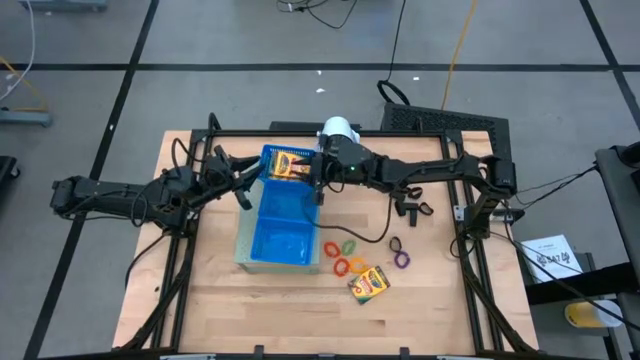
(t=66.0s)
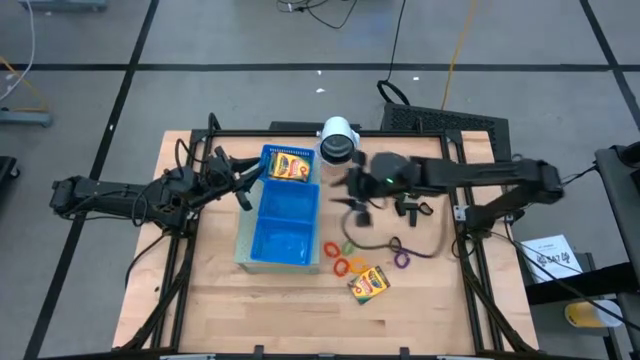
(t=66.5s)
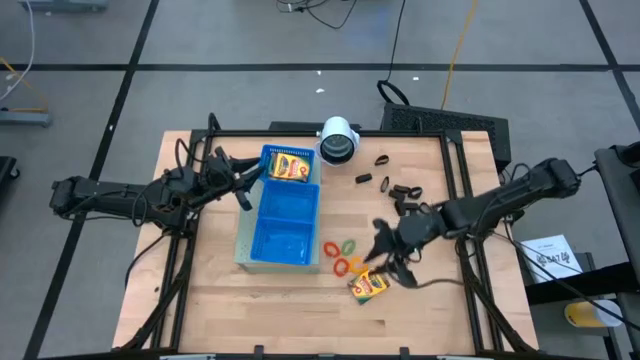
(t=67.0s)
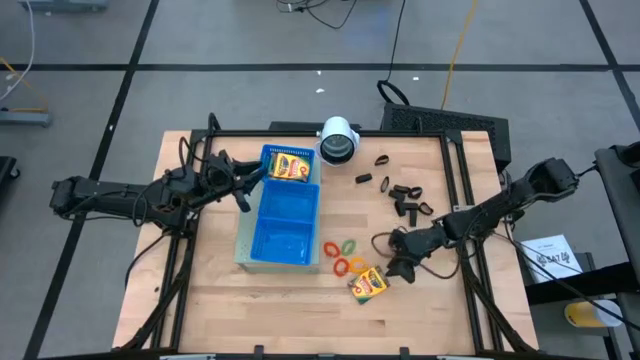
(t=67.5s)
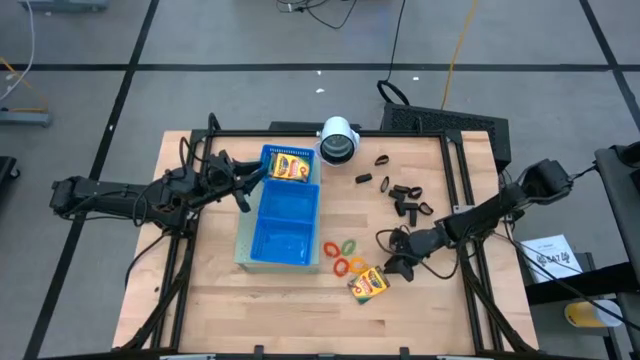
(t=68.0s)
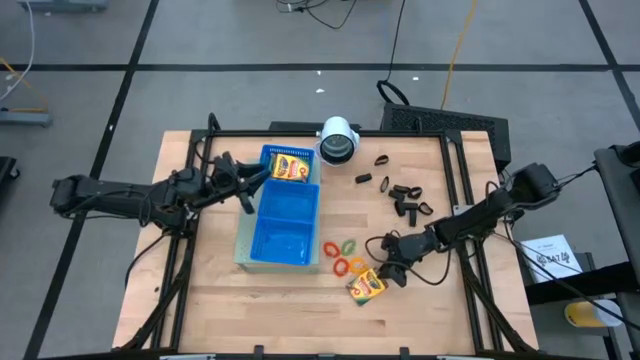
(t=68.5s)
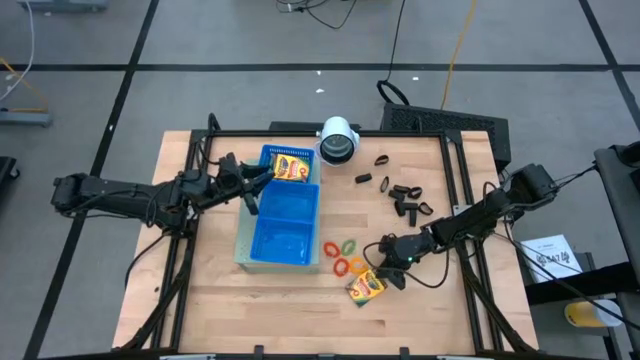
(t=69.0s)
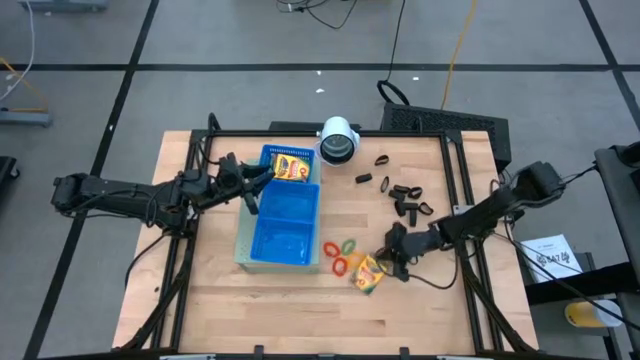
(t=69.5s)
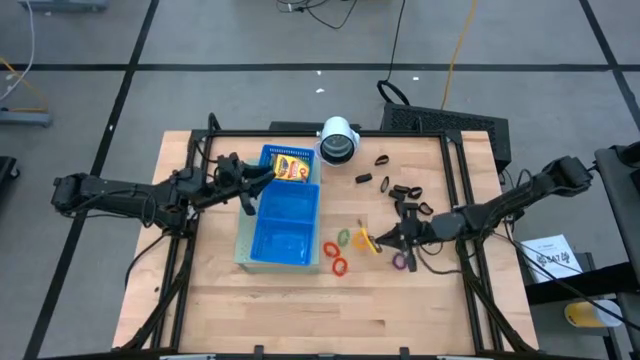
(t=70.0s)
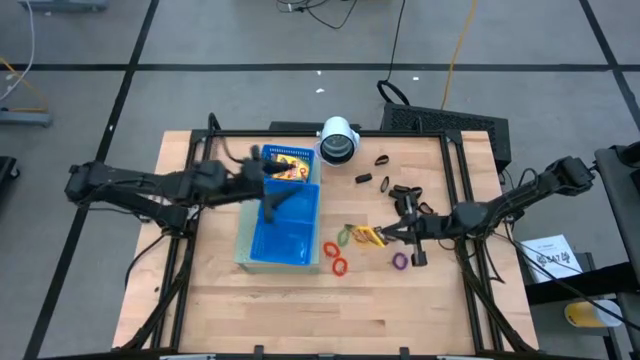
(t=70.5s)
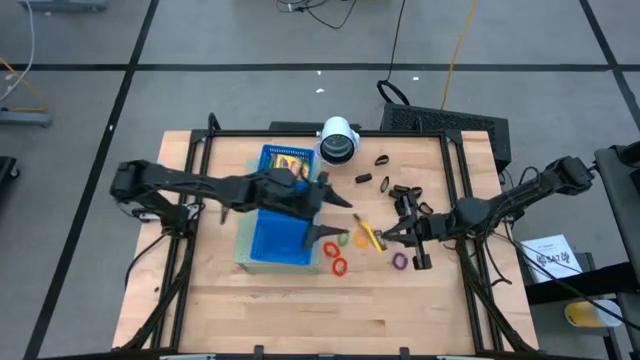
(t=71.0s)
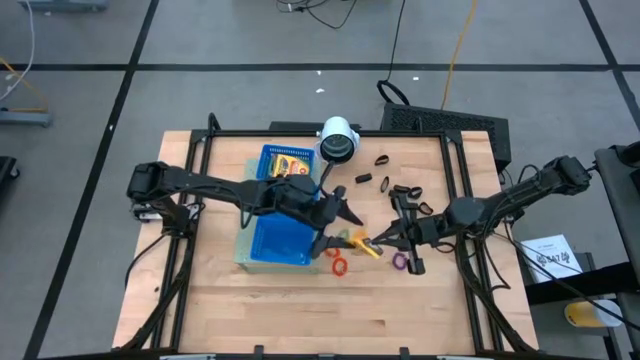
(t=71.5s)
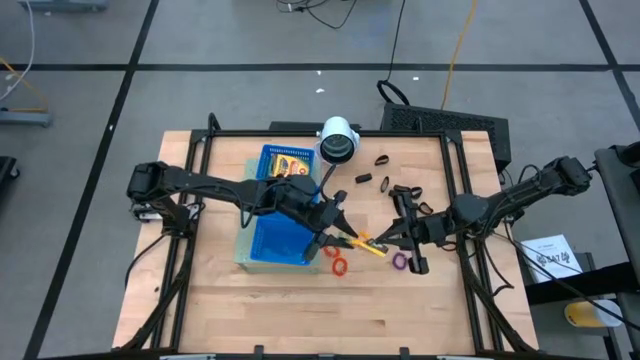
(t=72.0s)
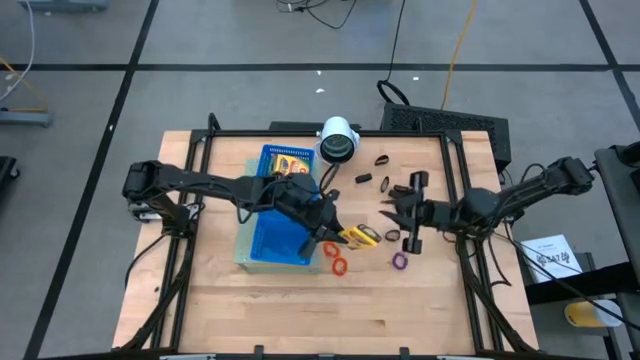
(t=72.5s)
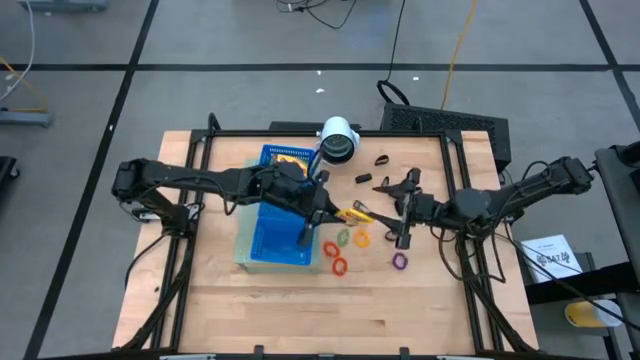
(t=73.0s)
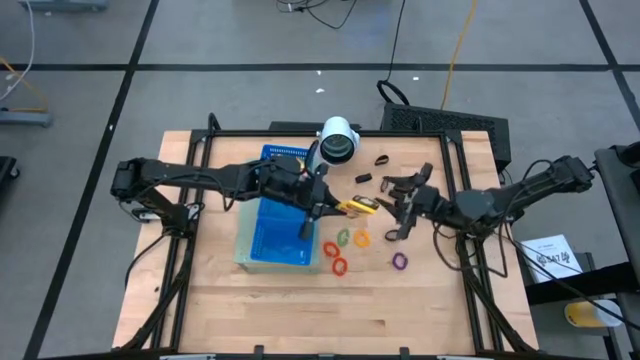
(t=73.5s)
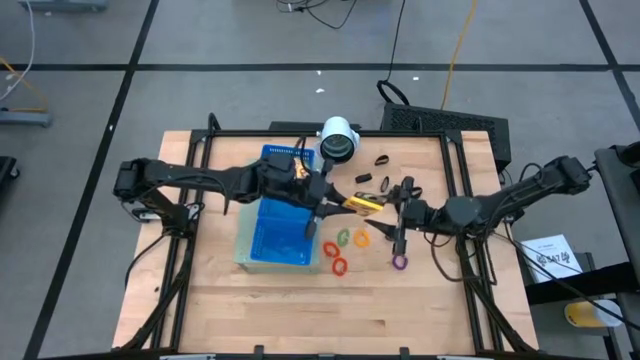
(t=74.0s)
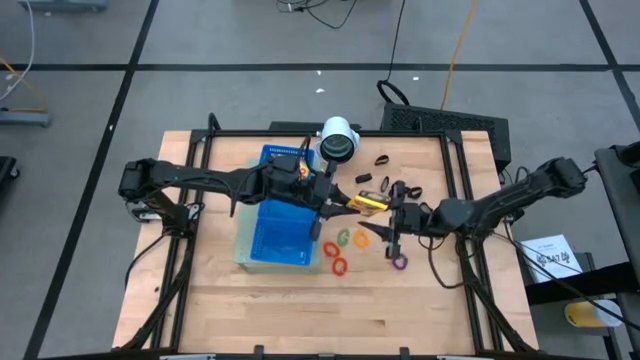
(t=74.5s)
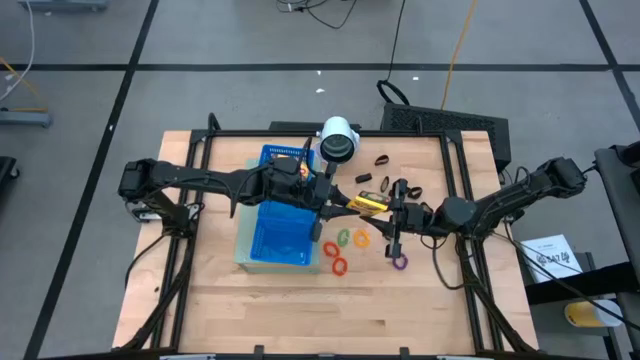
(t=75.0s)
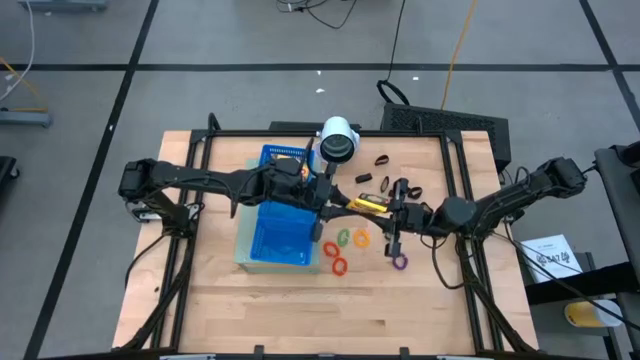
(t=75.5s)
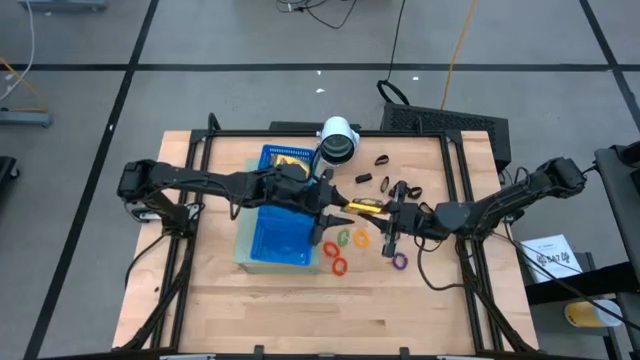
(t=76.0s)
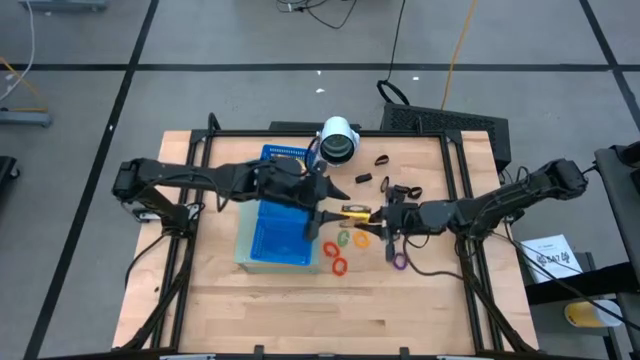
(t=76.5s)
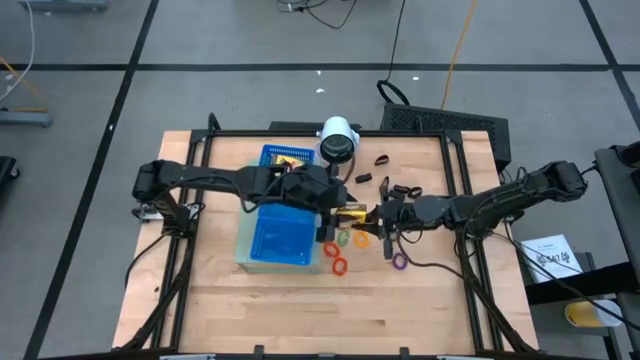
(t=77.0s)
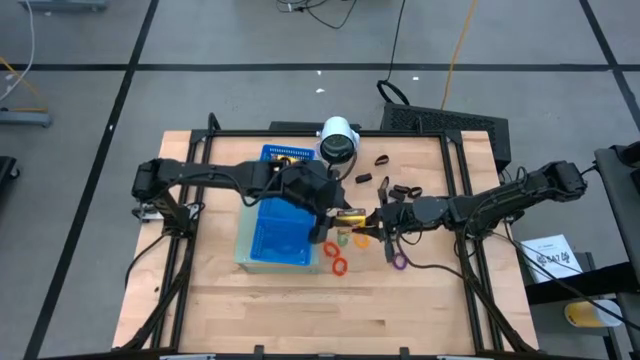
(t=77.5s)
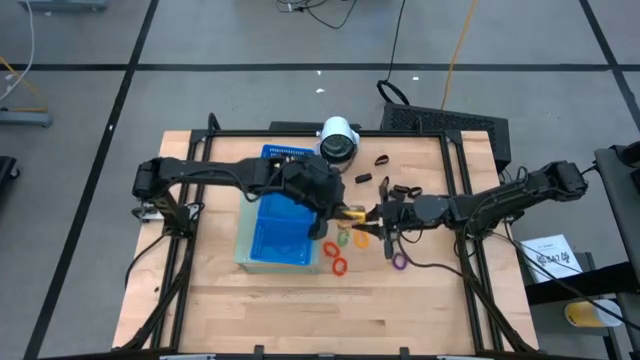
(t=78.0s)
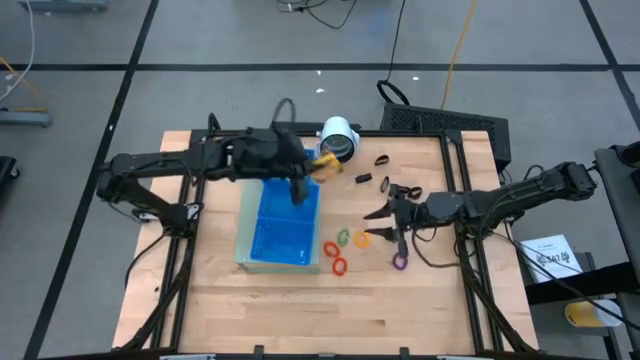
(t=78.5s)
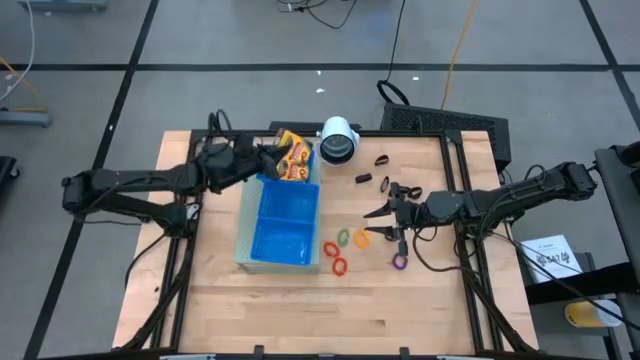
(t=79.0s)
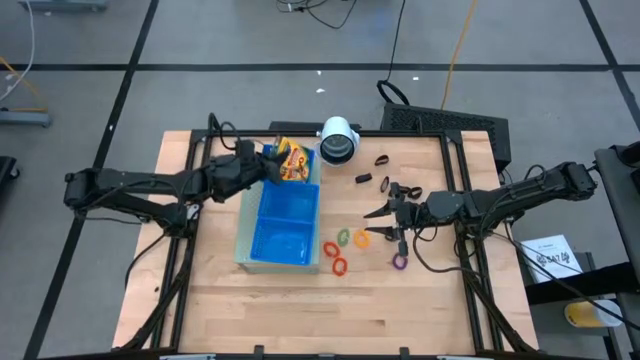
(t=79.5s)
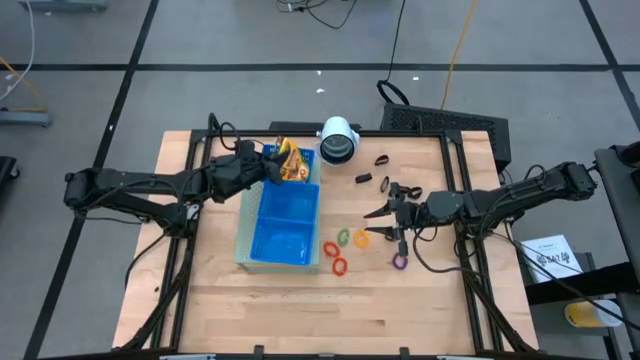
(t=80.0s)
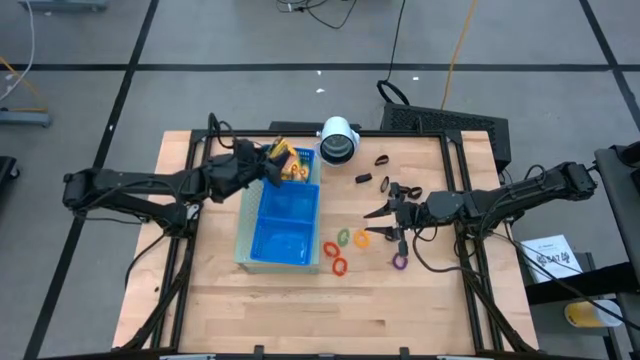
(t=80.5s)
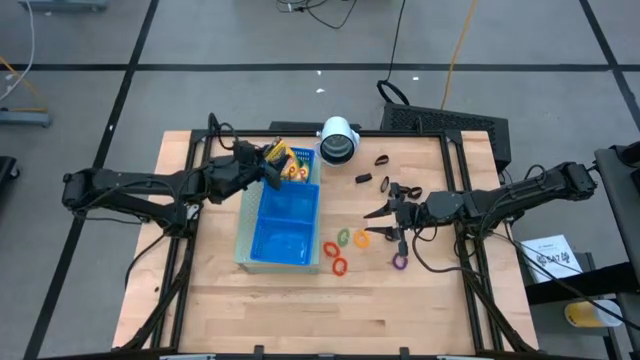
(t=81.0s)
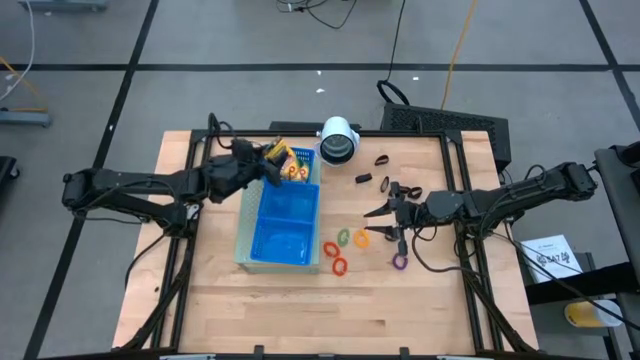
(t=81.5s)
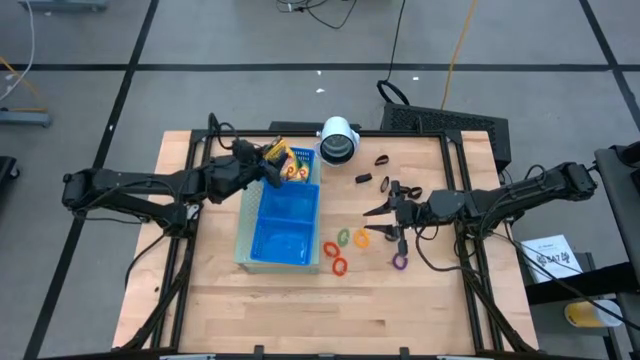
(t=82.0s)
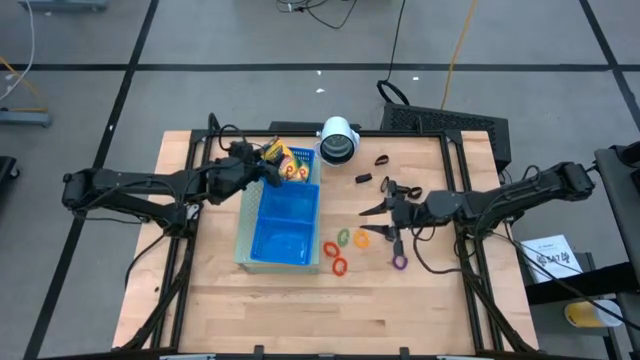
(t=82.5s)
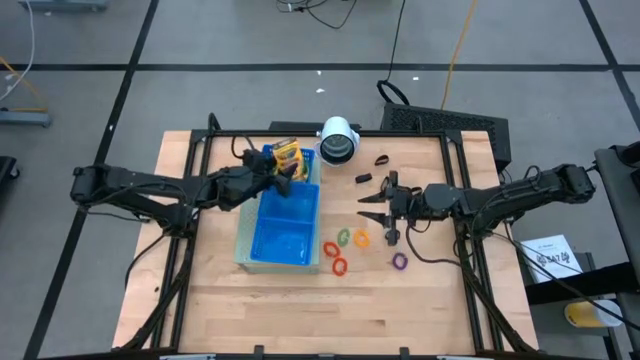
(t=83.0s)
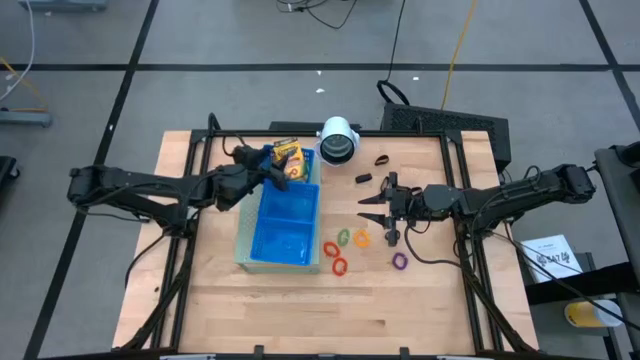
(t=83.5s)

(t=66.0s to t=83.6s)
Task: Pick & Place Office Desk Supplies
Put the crayon box into the top blue bin on the shelf

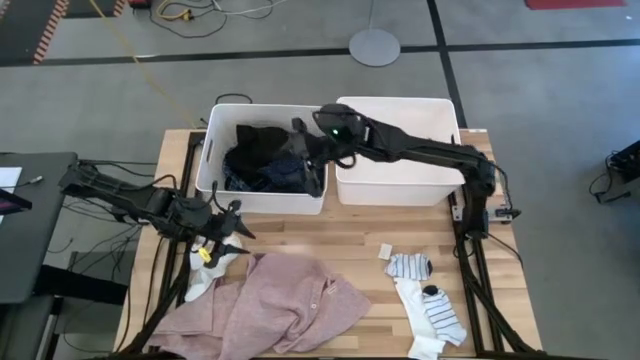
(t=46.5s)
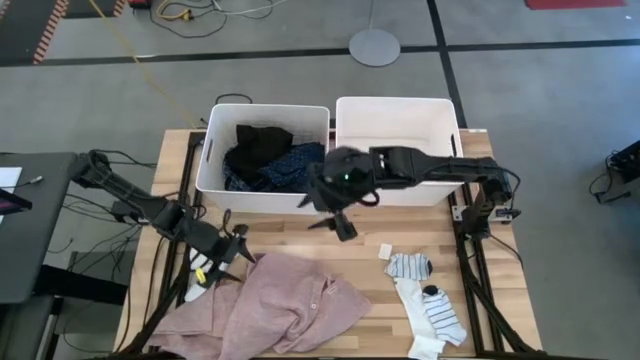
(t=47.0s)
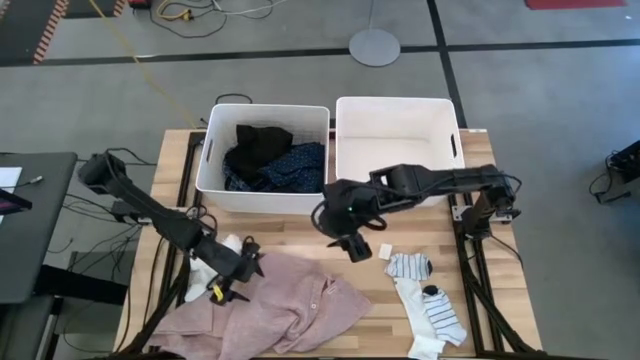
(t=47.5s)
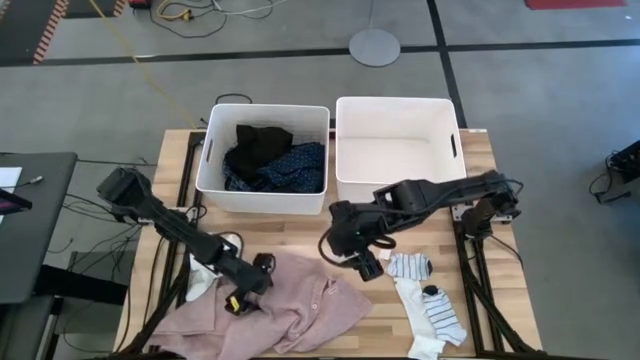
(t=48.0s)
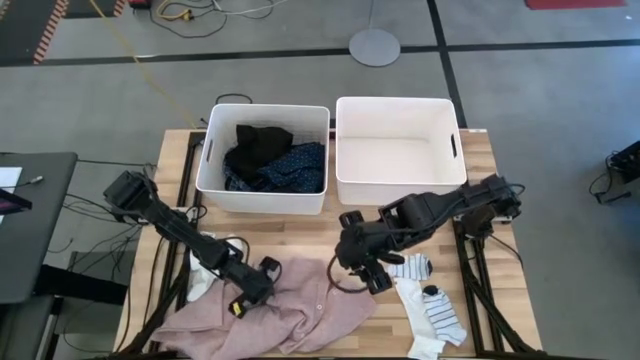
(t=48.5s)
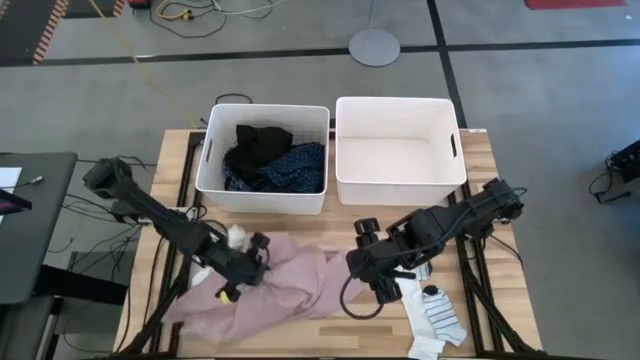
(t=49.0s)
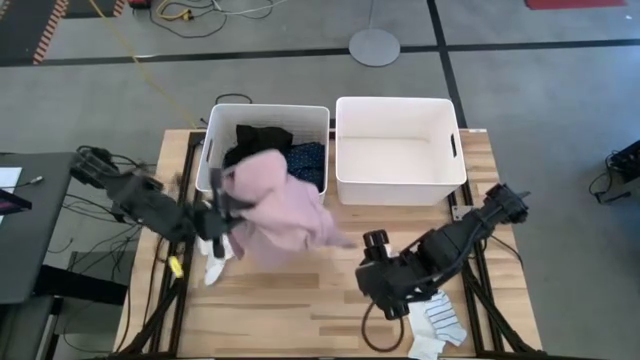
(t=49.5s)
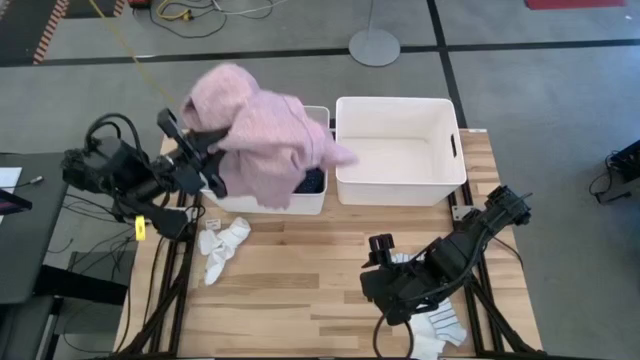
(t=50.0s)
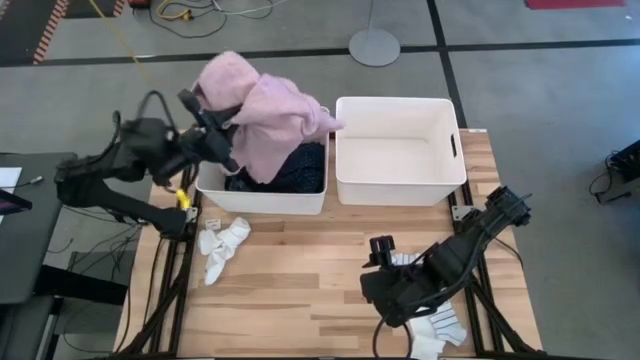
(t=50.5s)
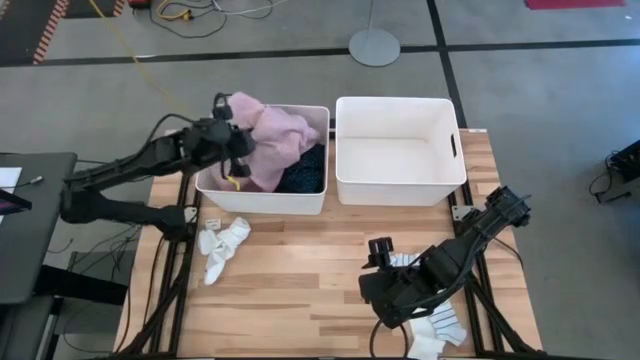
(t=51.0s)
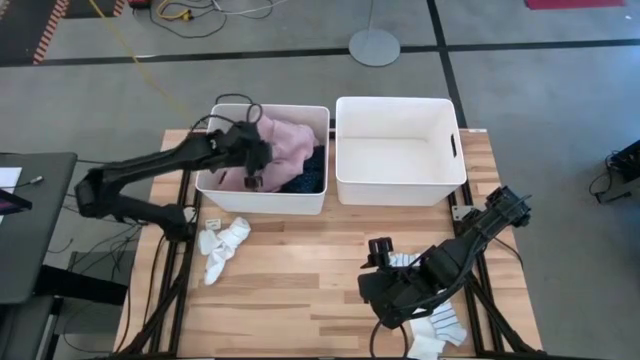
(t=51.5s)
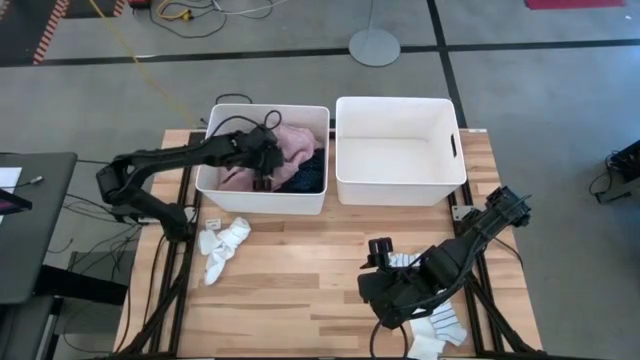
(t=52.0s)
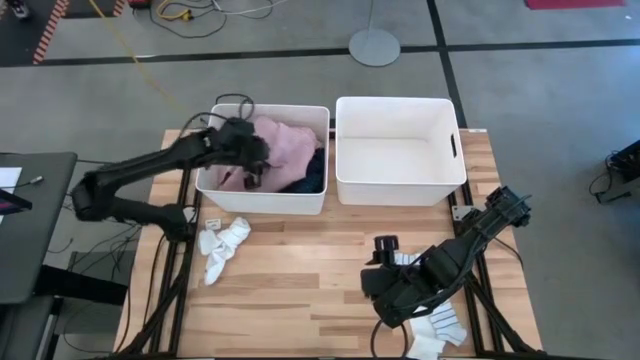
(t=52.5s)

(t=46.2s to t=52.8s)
Task: Sort clothes
Put the pink shirt into the left white laundry bin
